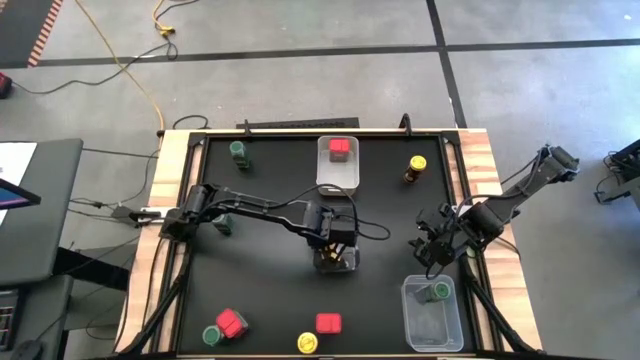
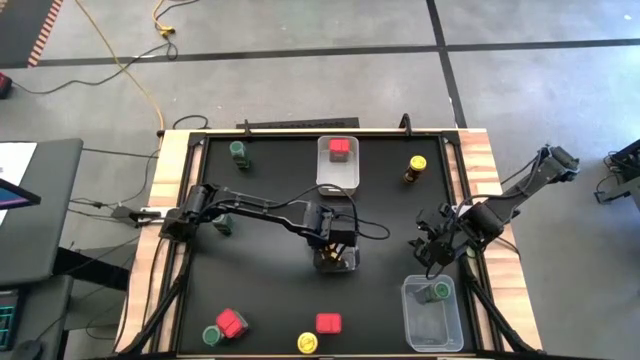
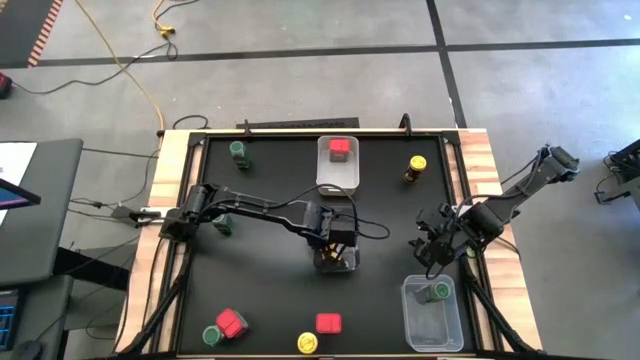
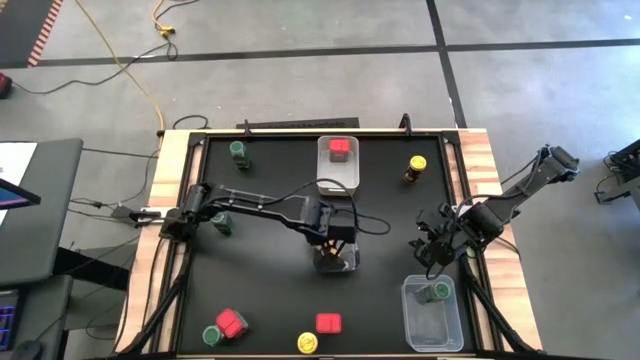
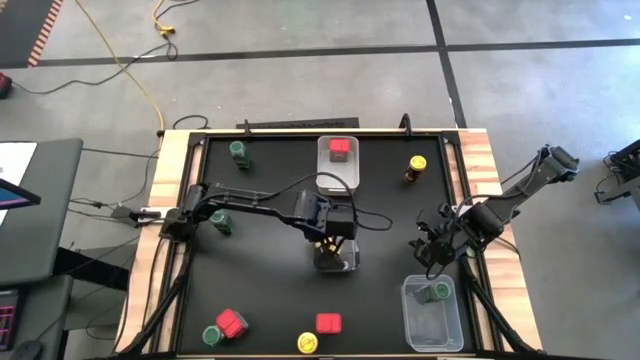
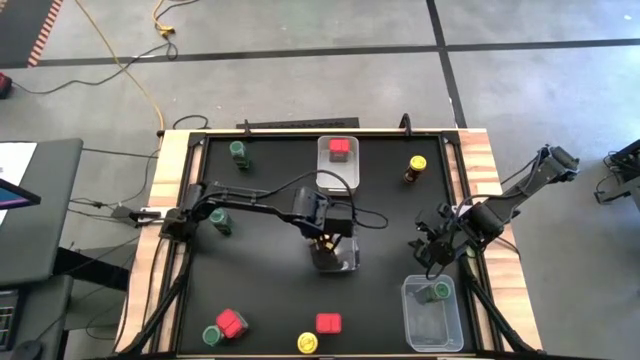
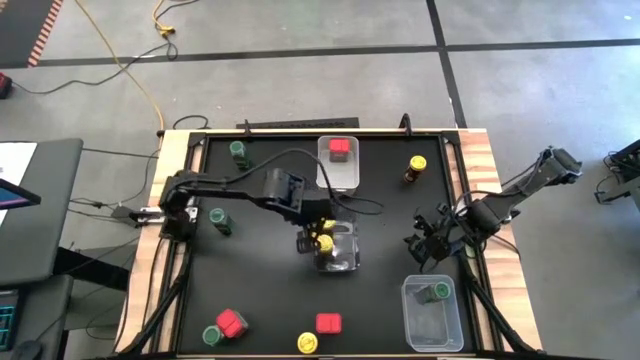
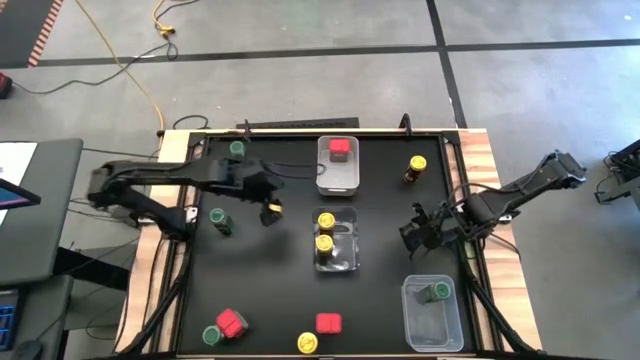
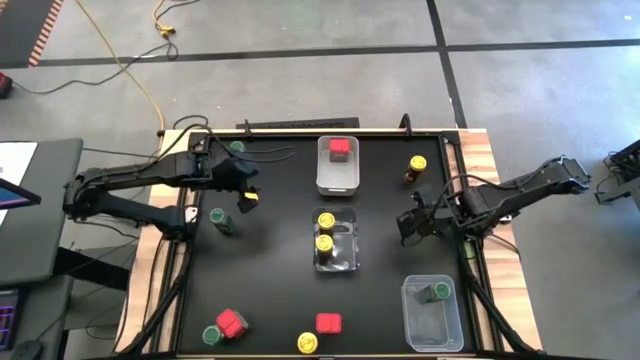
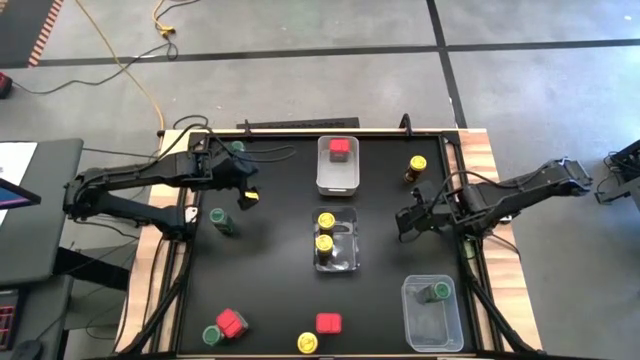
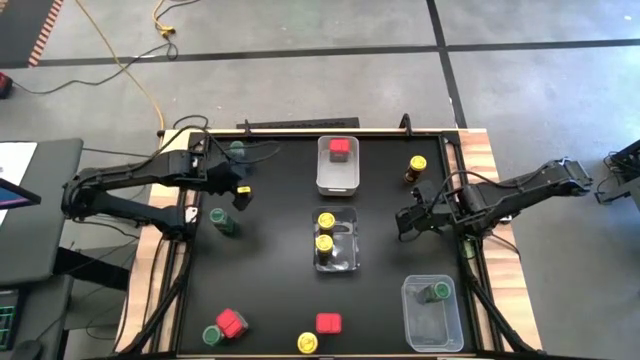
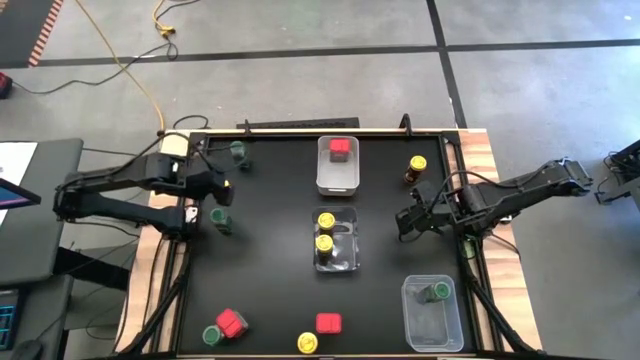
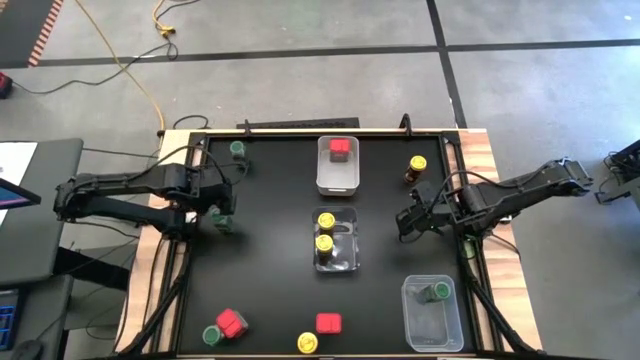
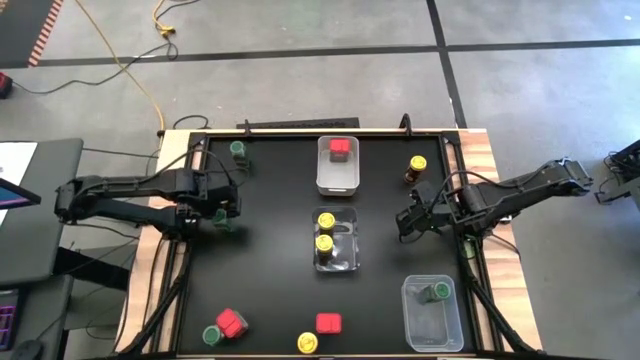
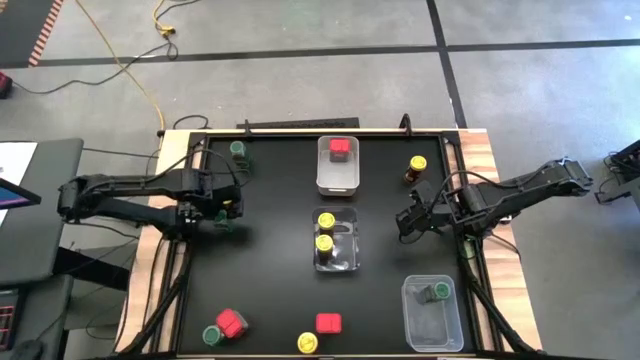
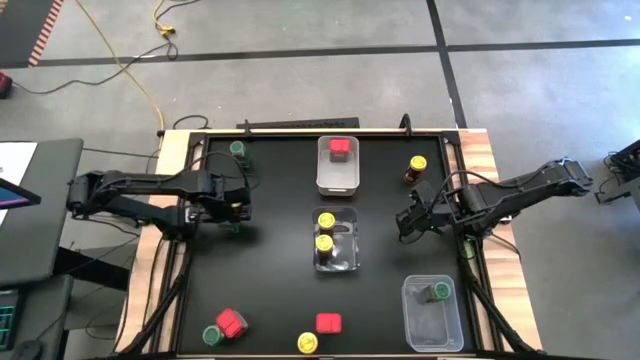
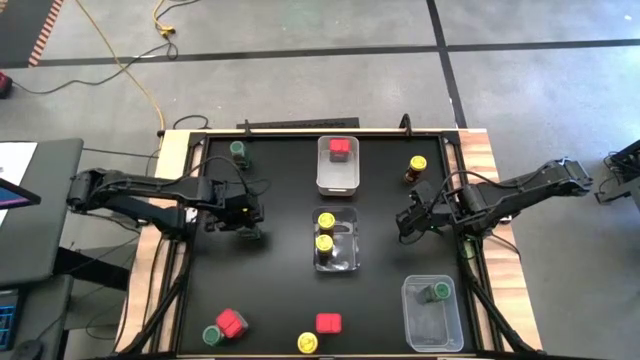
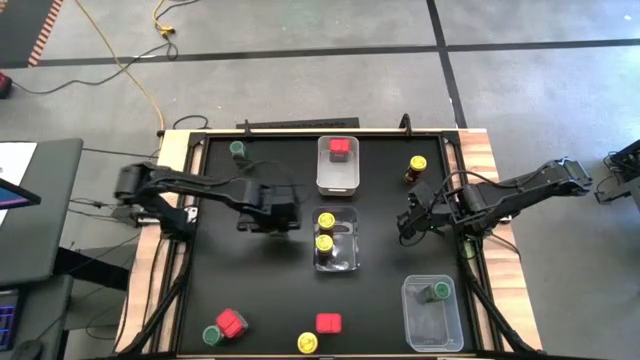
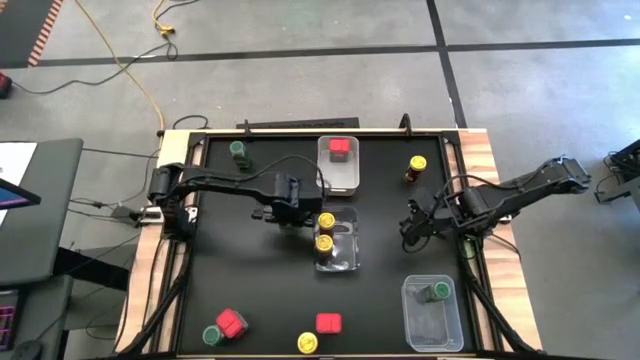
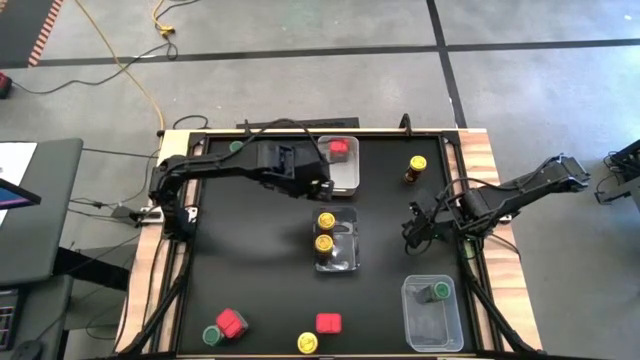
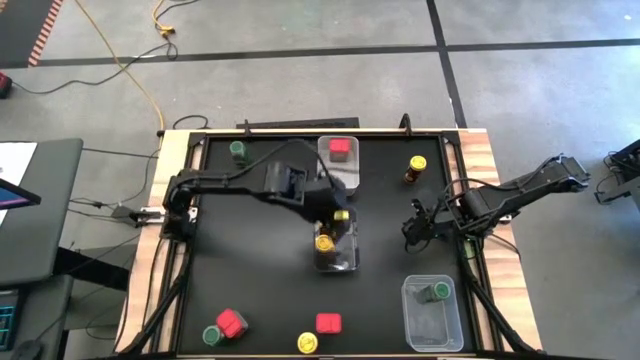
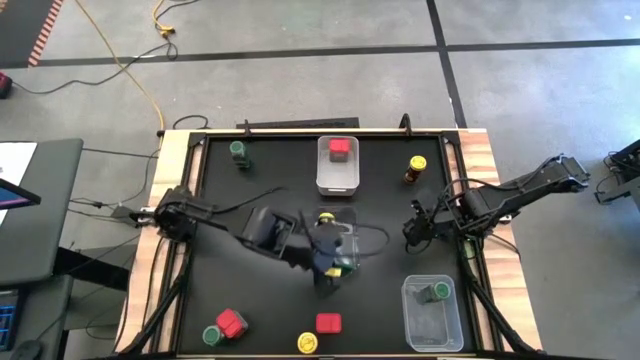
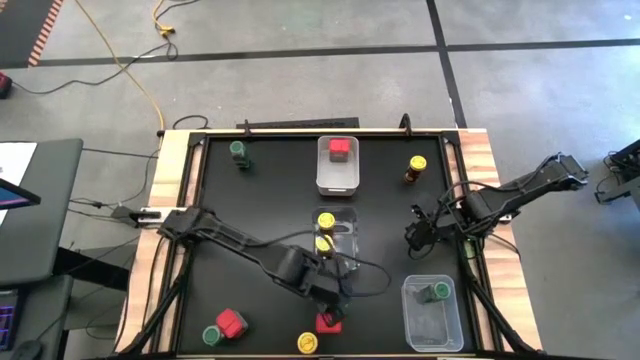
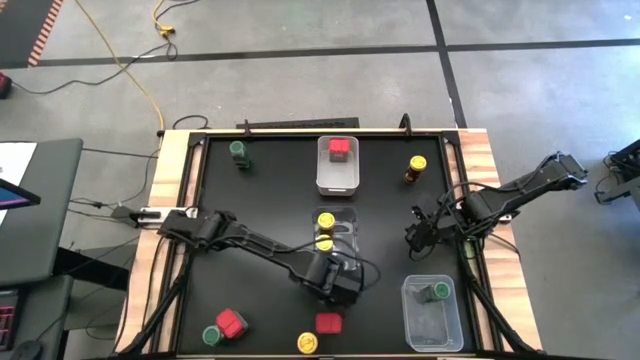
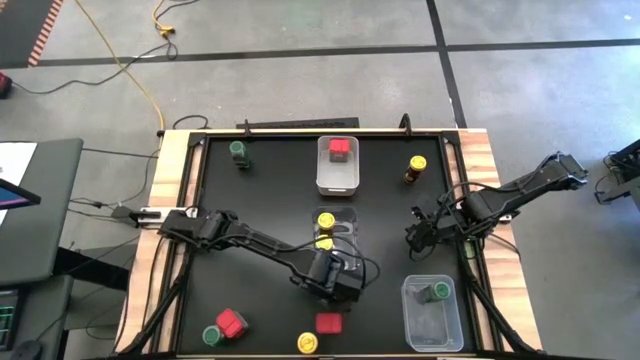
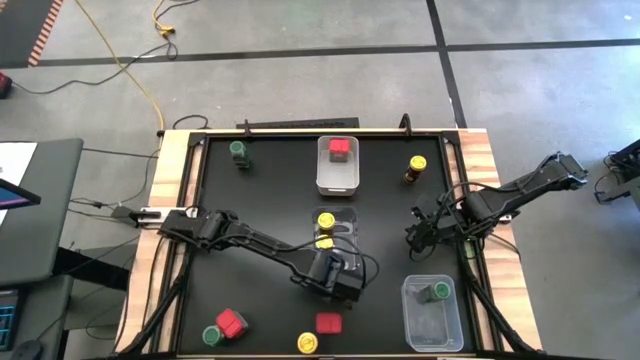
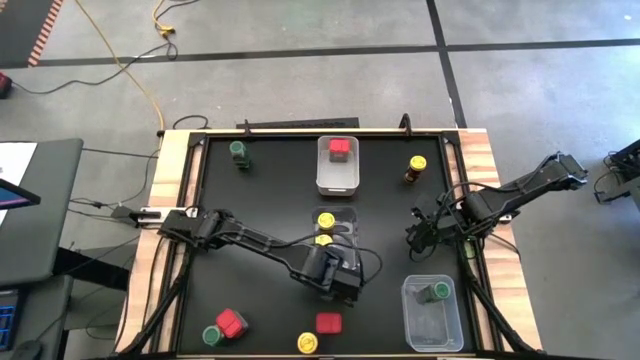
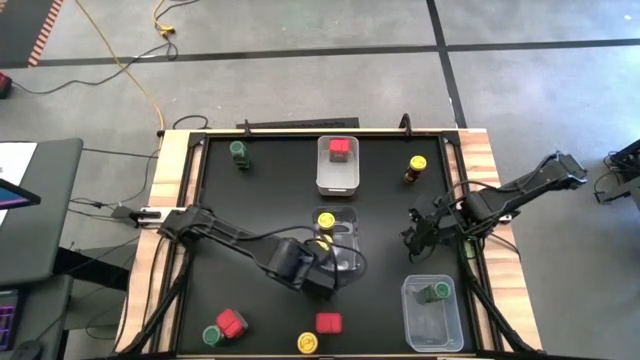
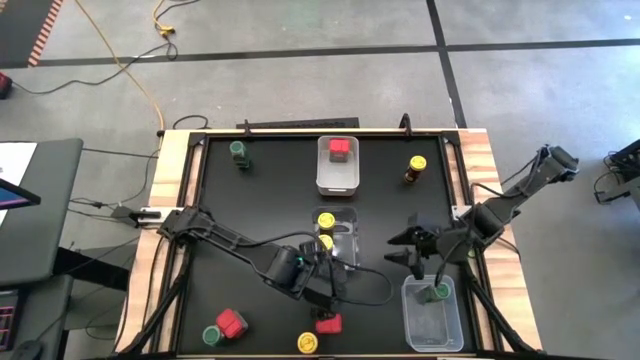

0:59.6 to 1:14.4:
Task: Sort spices by type
Put the middle right green seasoning bottle into the transparent bin

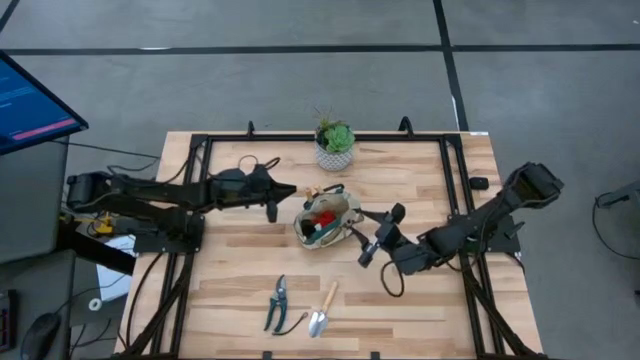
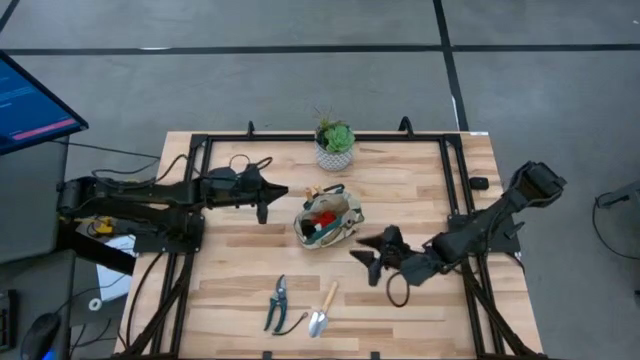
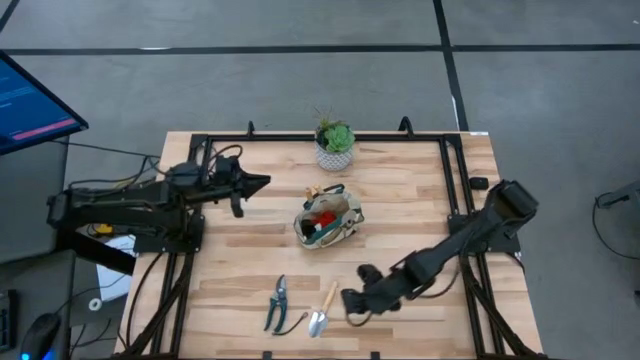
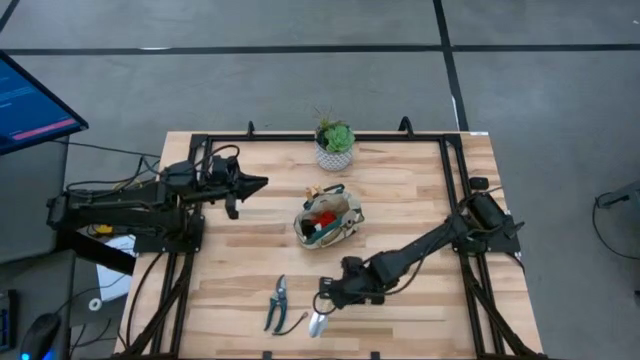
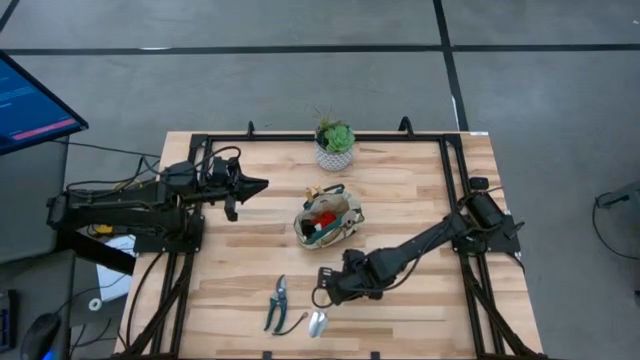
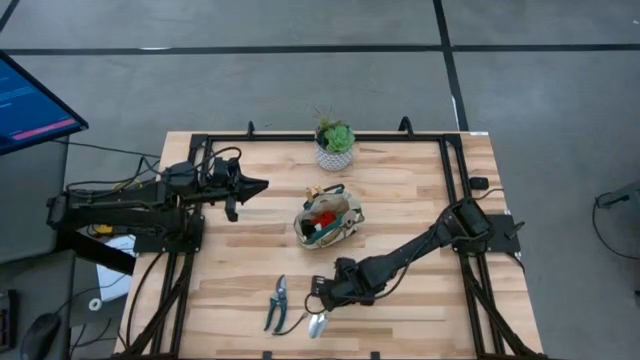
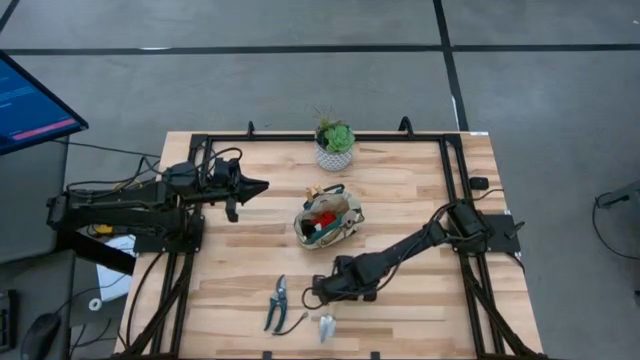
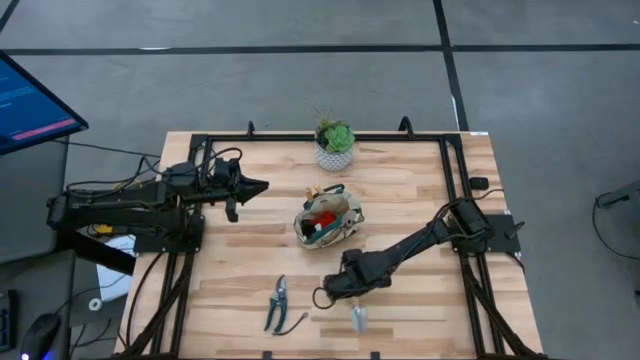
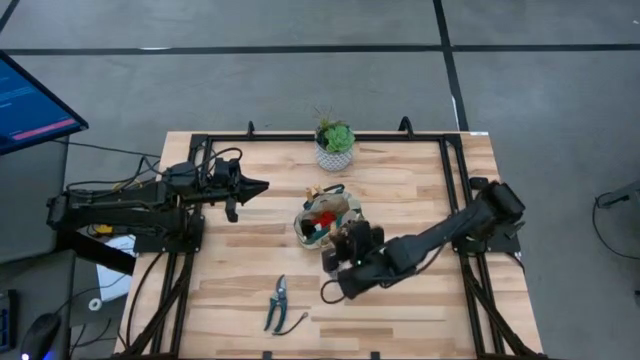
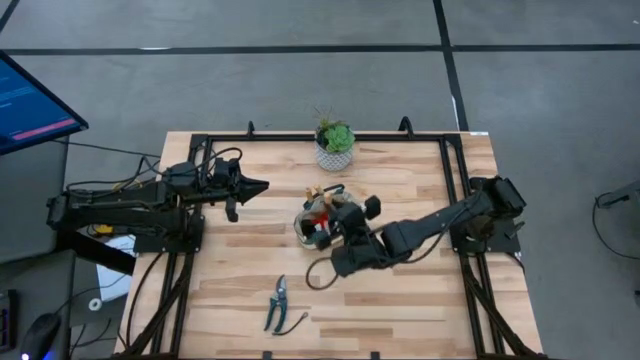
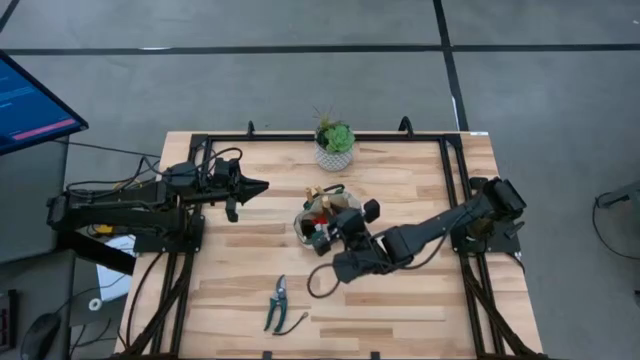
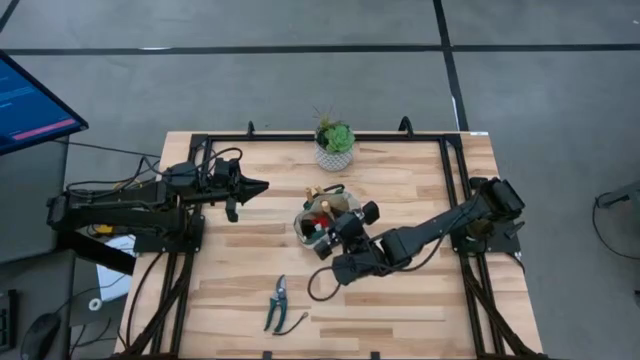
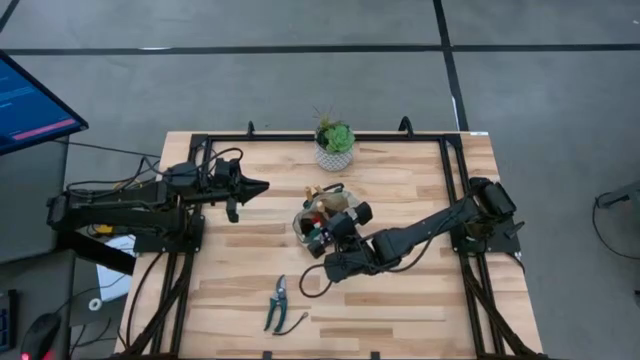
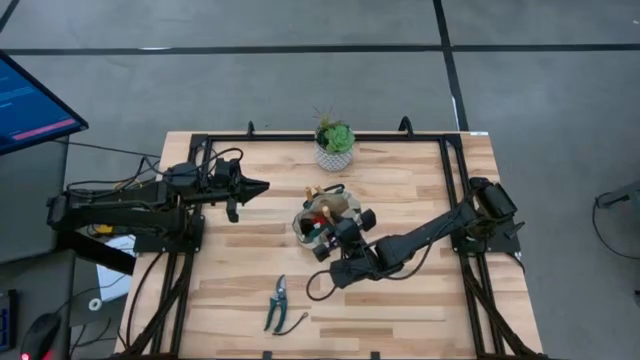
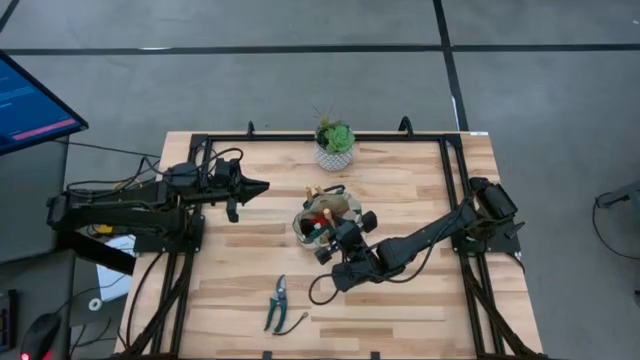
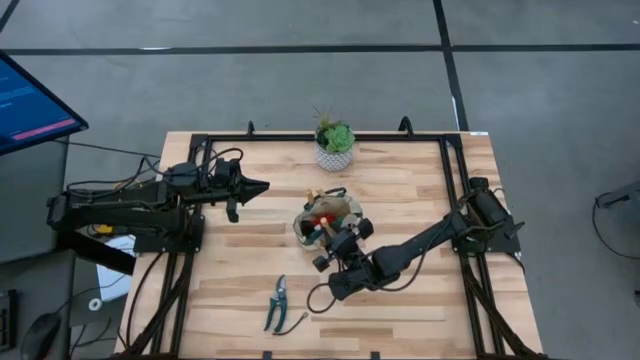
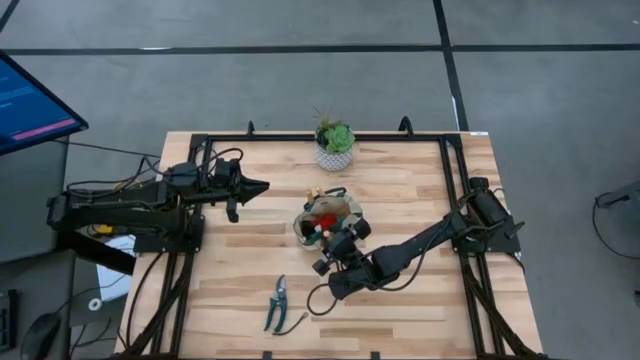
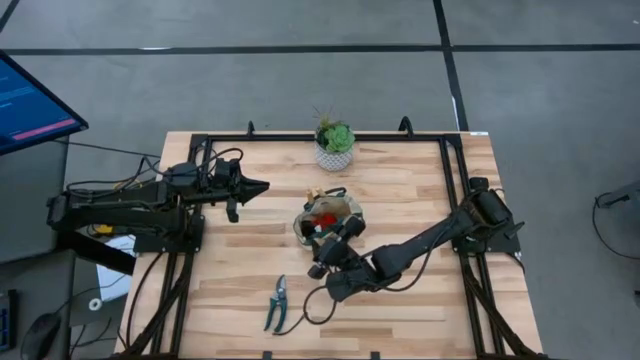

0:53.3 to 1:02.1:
Task: Pick & Place Garden tools in Gardening bag
Put the trowel into the gardening bag
